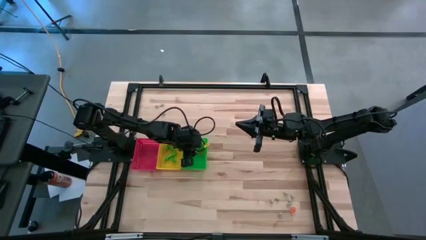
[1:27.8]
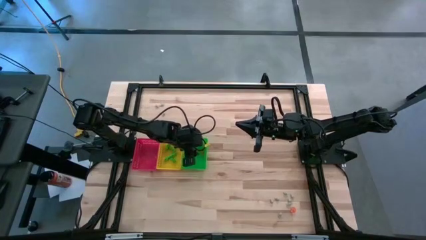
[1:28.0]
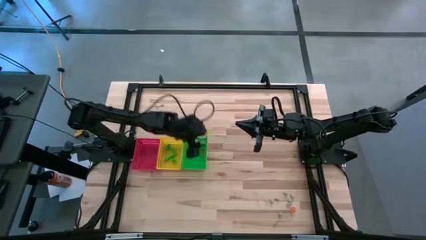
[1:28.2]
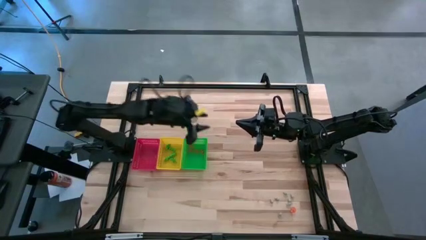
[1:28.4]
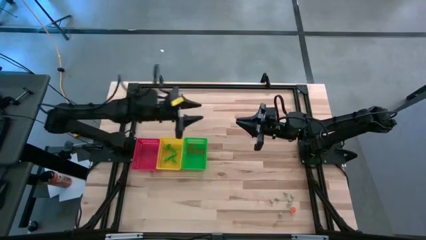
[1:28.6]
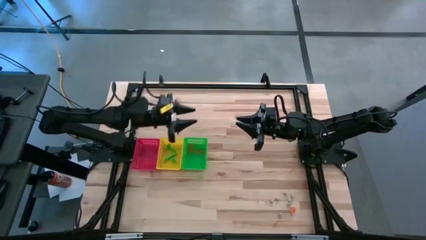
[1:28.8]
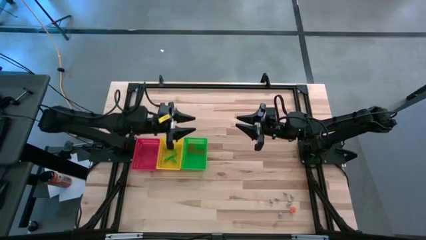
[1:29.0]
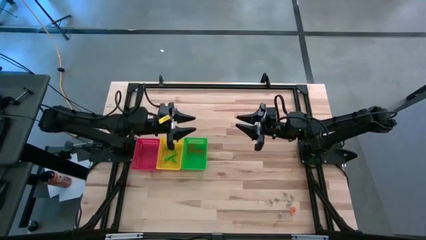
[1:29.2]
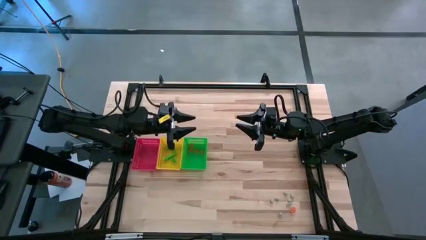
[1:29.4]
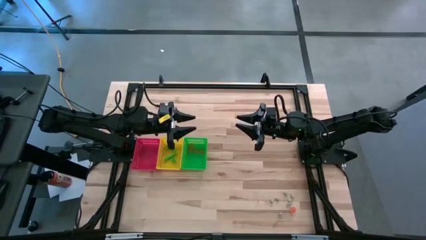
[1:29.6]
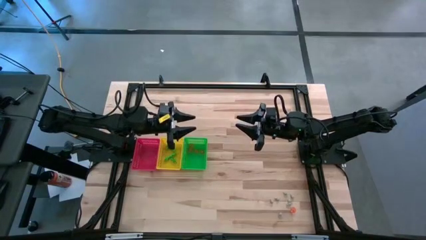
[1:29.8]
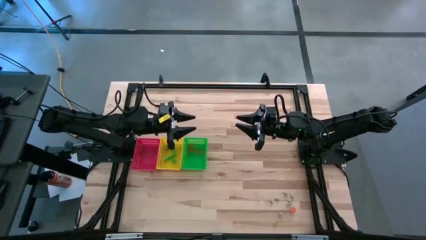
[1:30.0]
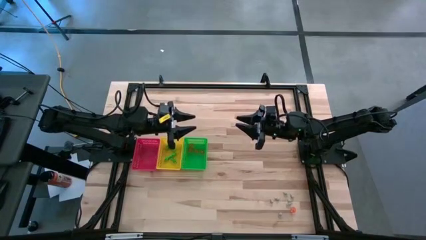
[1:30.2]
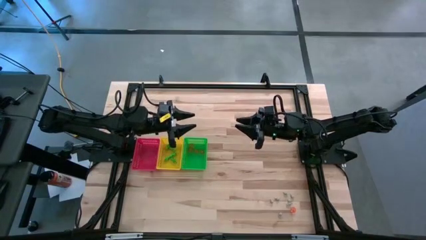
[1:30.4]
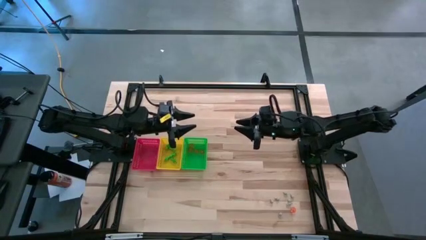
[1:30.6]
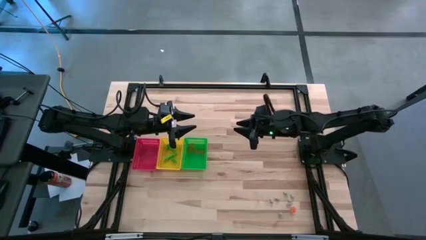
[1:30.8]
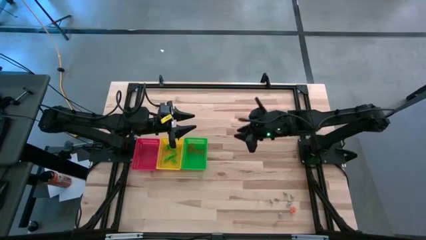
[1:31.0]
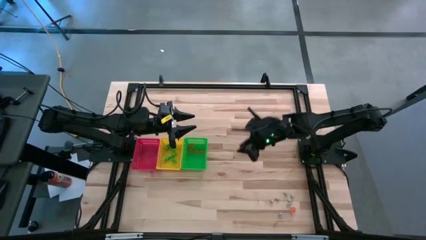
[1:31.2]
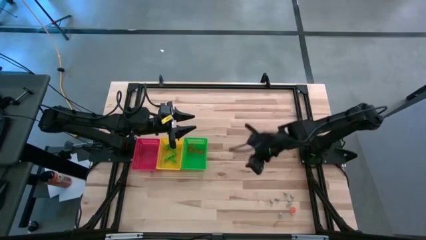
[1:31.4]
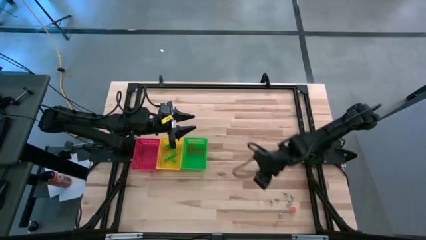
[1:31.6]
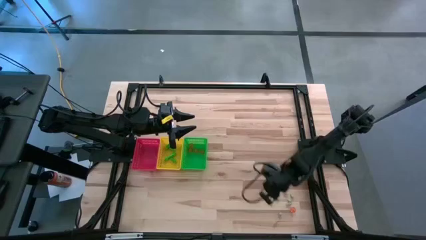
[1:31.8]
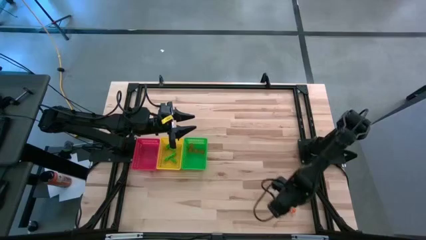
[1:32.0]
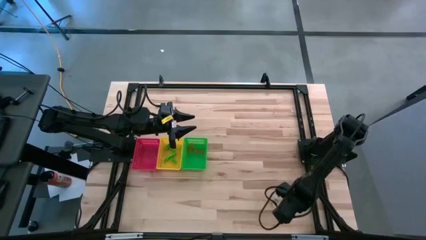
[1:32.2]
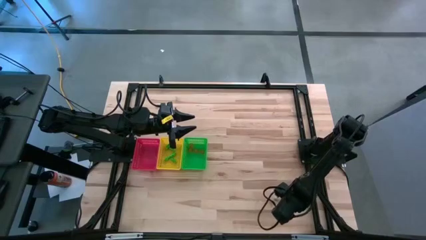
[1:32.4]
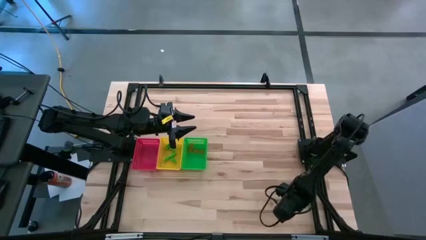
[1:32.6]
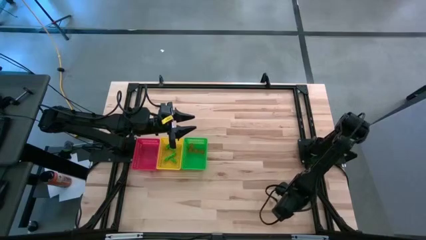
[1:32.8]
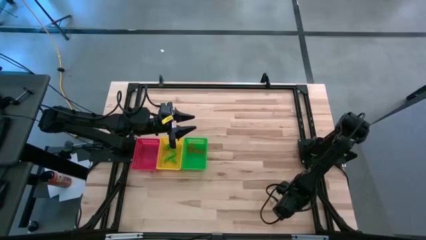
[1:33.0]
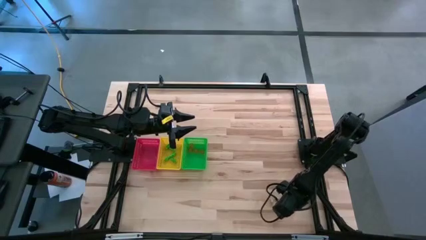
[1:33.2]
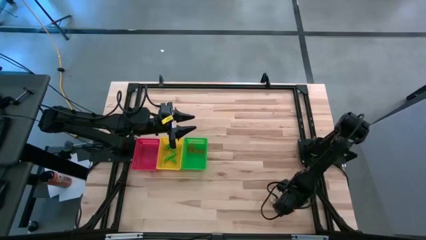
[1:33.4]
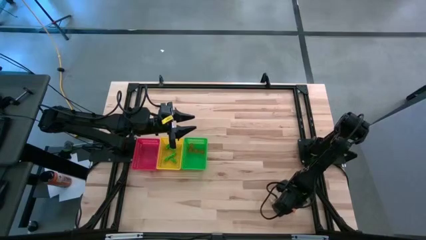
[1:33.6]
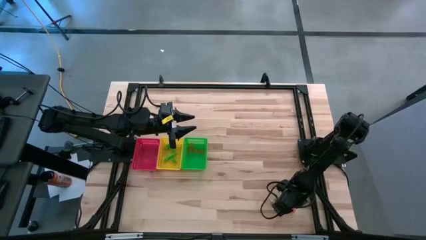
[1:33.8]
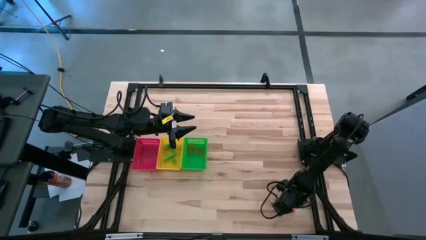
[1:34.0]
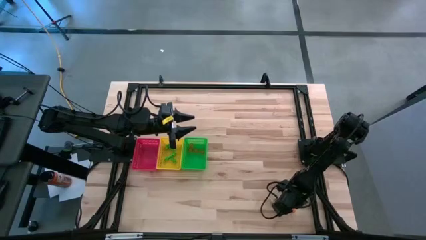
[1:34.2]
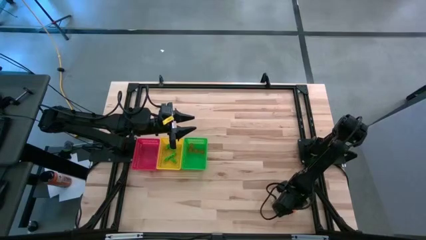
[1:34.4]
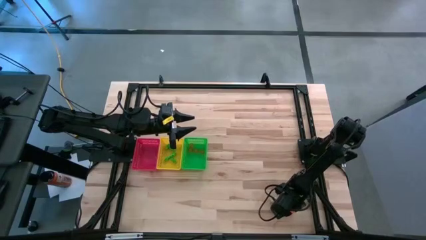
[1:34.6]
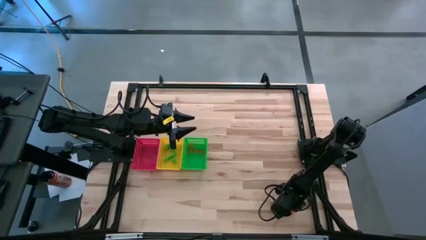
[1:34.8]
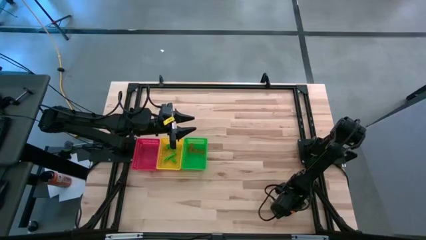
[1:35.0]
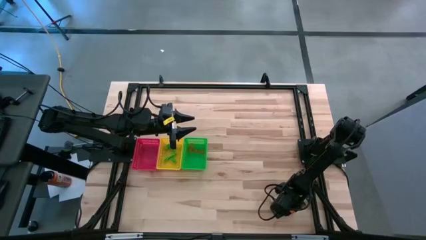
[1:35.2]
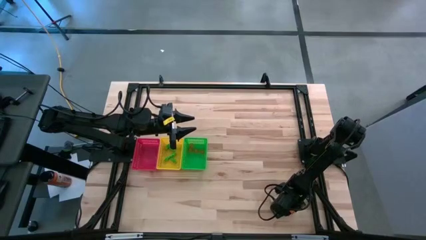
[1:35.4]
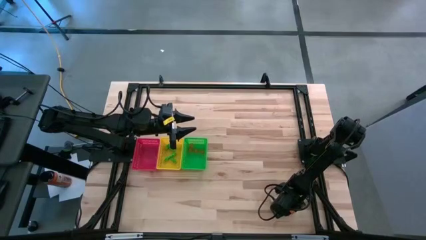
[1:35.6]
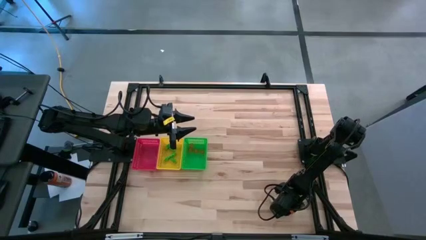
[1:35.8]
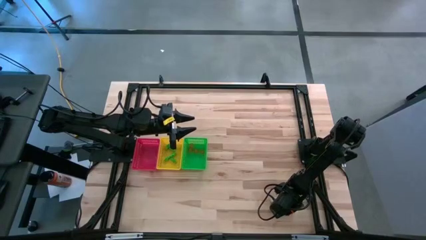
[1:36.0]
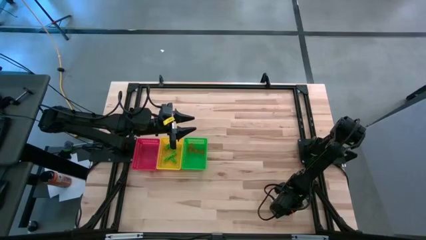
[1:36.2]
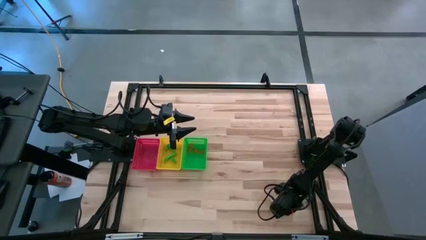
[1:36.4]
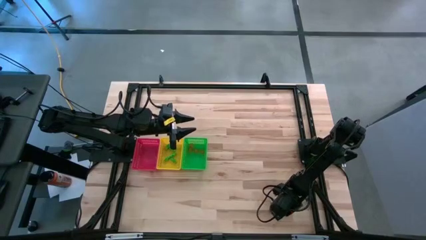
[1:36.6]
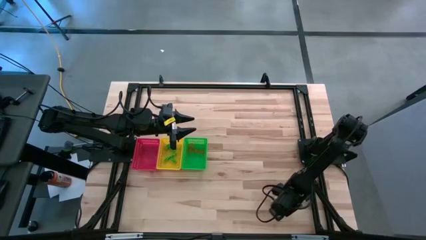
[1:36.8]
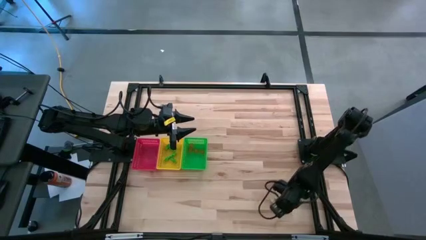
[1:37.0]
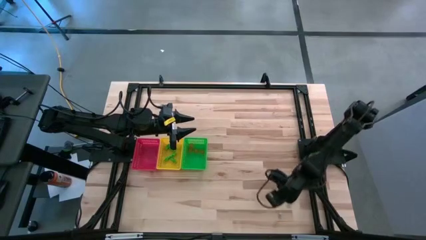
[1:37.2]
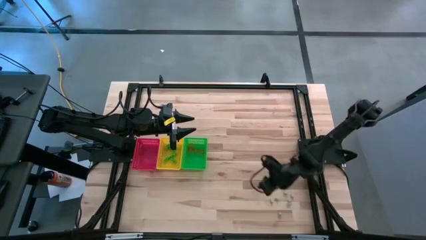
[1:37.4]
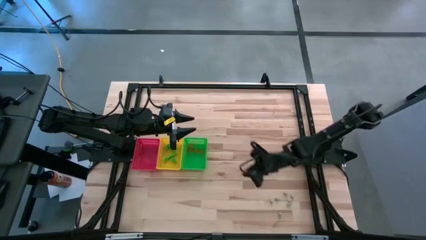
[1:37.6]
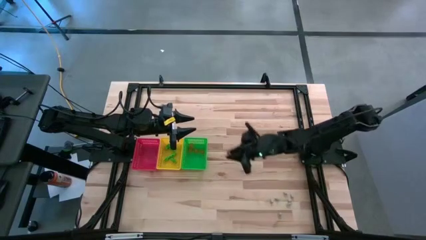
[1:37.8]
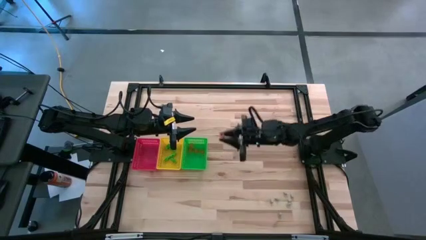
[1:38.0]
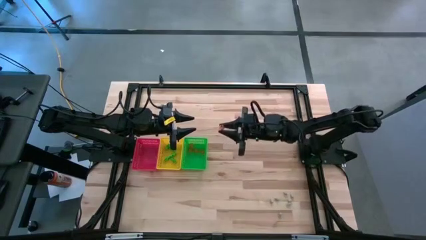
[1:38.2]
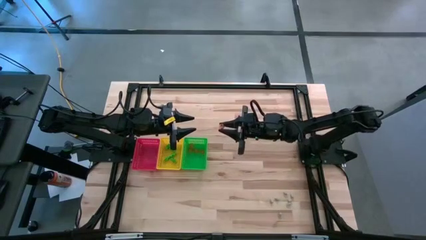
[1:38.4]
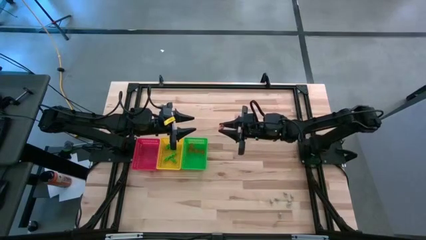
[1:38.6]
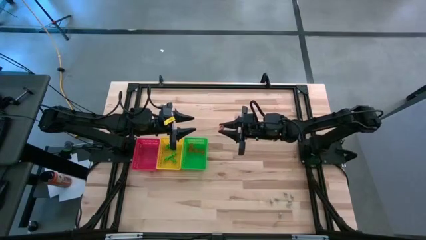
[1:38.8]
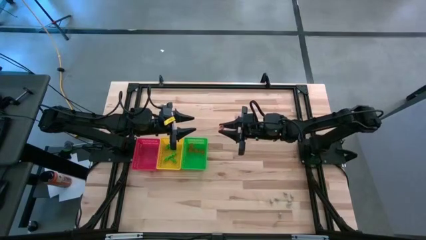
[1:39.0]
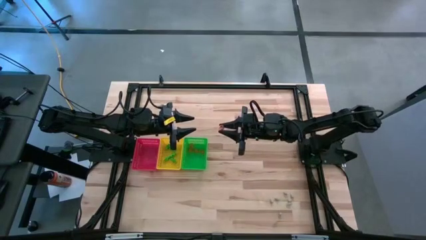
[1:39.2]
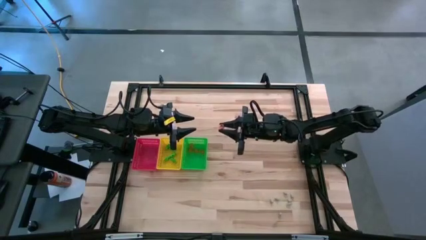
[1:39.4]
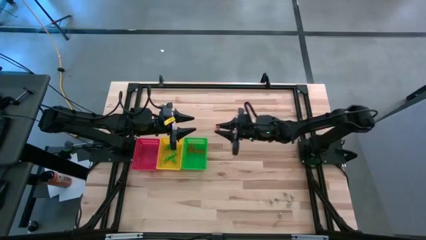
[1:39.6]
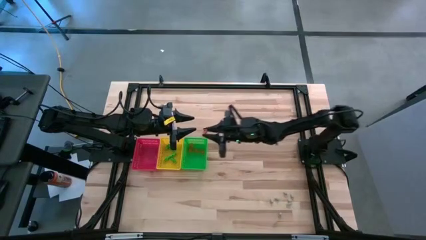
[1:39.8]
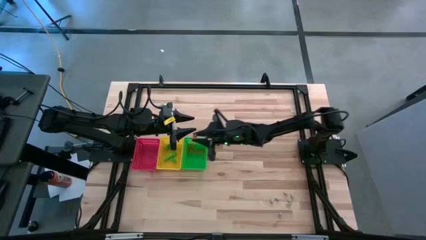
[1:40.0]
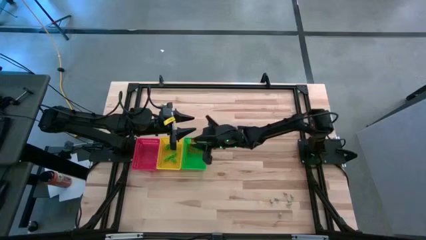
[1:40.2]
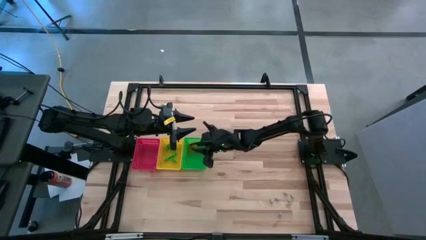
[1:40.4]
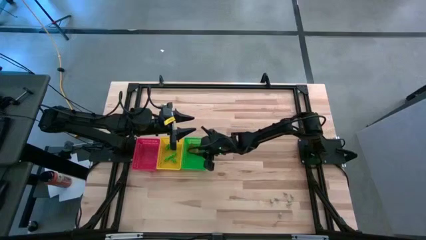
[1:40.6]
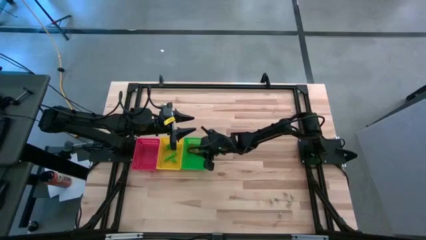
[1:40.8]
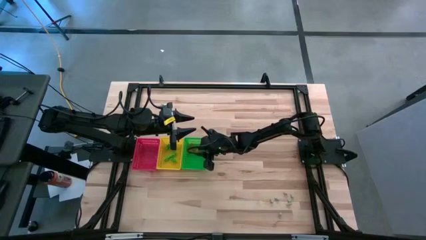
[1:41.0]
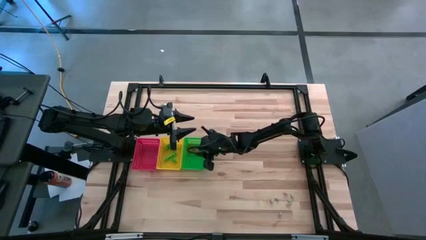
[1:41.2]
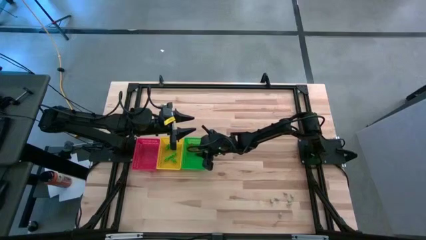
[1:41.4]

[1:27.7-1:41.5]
Task: Sort Halloween decoration
Put the orange pumpkin toy into the green bin

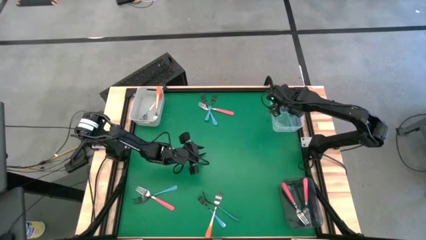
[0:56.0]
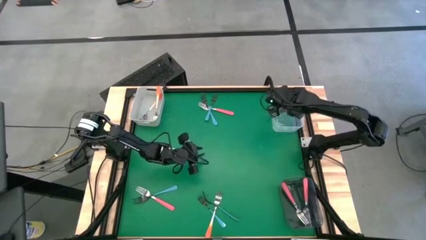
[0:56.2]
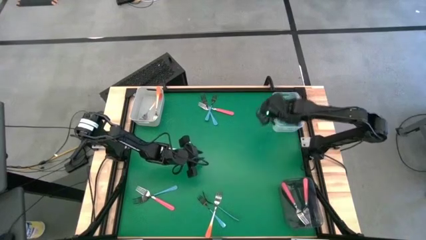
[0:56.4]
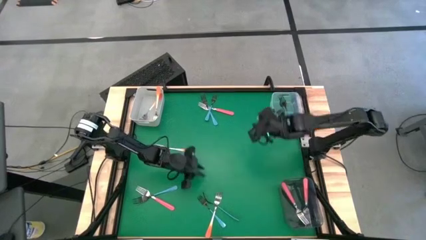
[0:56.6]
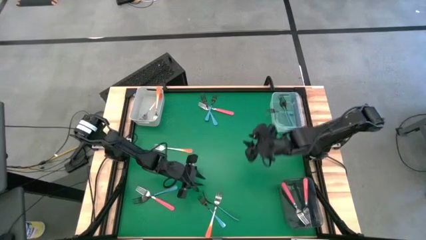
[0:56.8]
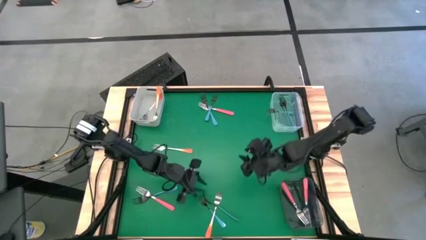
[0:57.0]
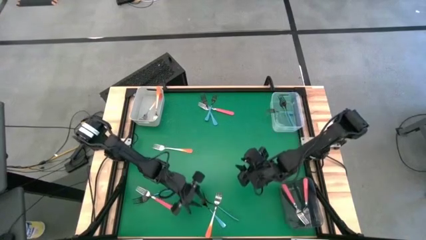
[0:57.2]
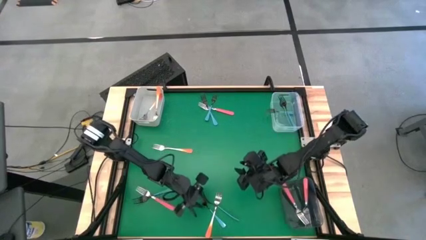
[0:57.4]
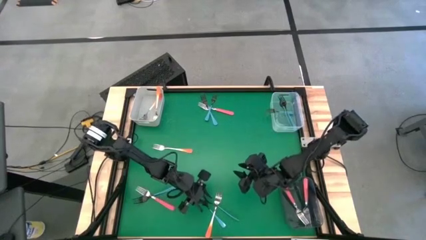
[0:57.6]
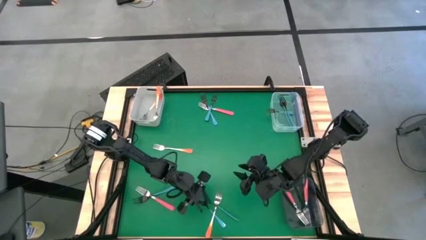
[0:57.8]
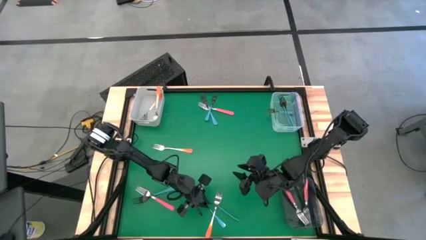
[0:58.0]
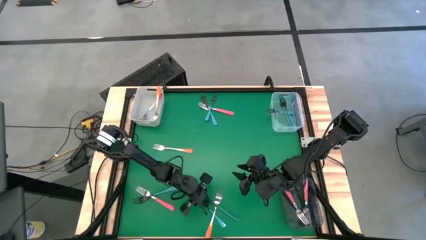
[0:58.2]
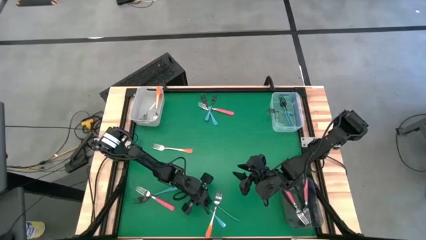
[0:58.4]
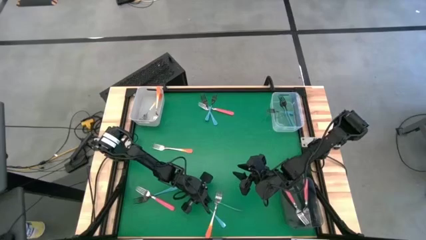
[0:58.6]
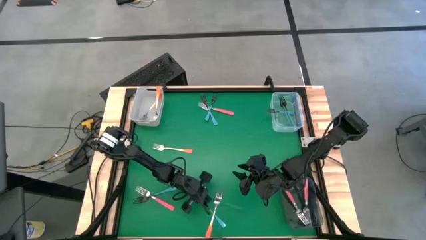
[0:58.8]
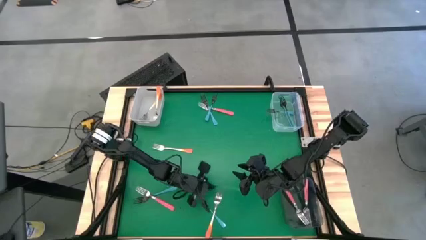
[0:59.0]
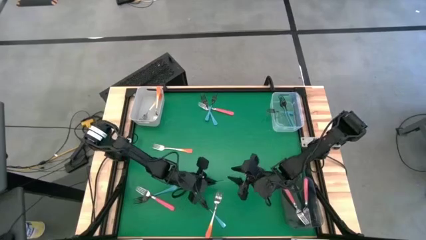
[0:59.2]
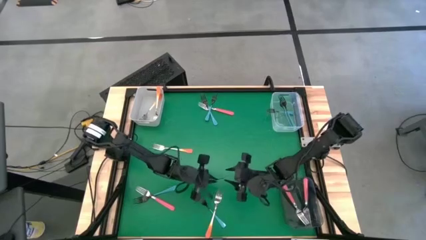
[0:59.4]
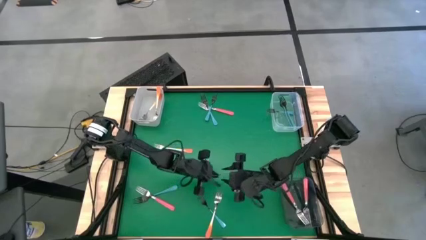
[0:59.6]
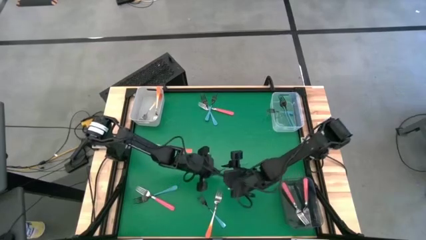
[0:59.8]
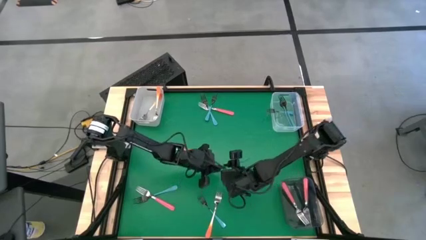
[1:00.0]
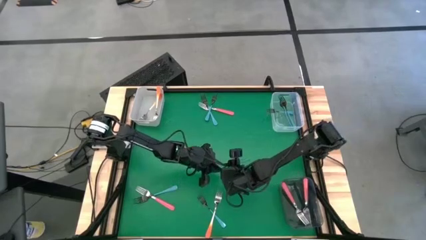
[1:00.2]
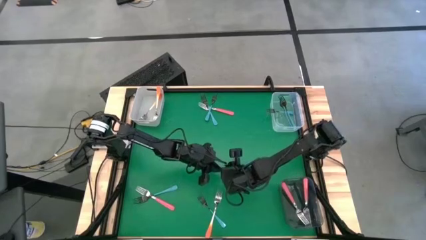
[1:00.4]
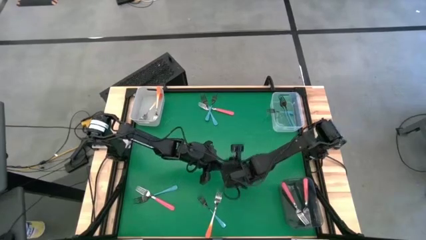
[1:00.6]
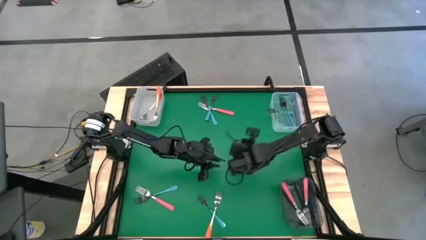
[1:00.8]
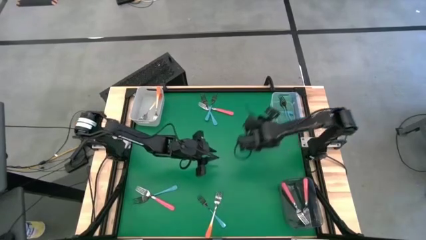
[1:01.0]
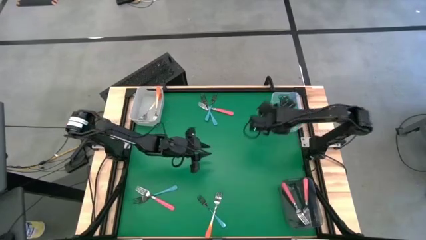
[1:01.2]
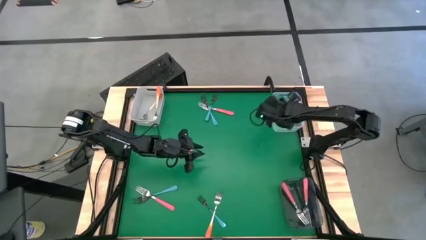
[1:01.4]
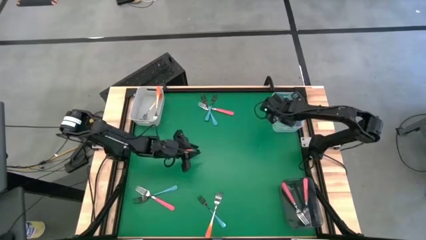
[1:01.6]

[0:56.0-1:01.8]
Task: Sort silverware by color (type)
Put the blue fork into the transparent bin
